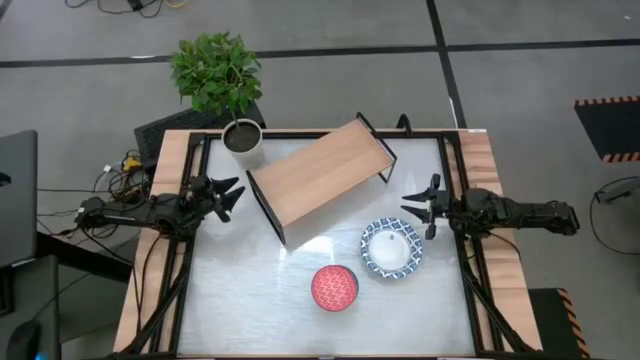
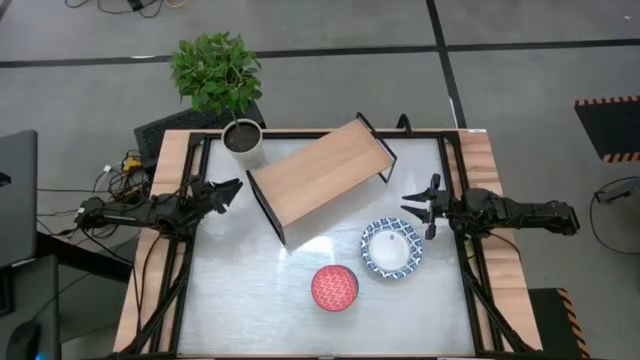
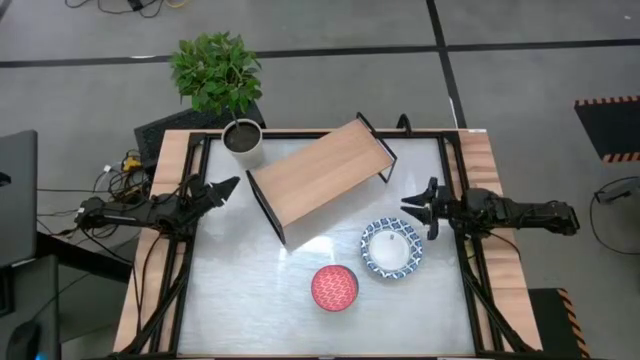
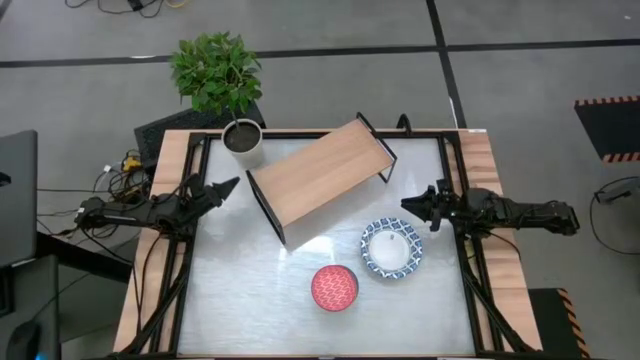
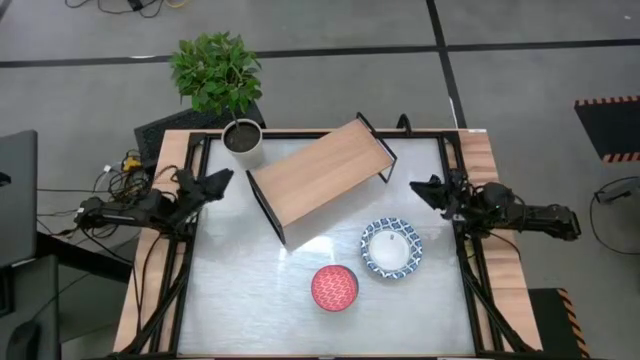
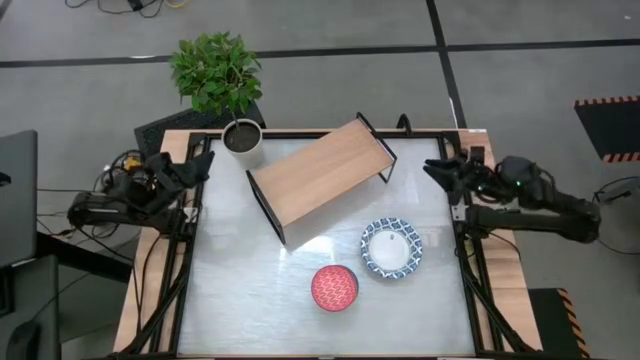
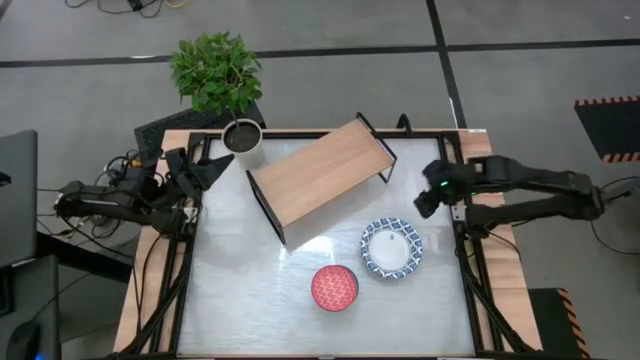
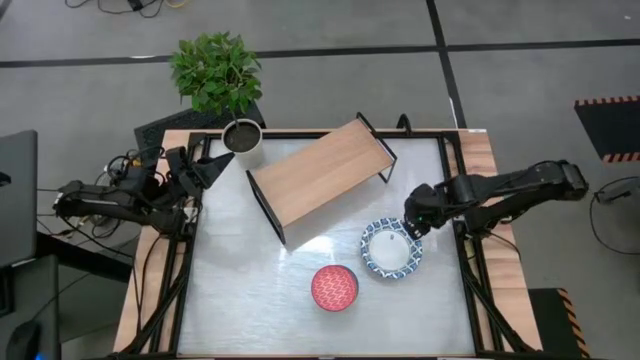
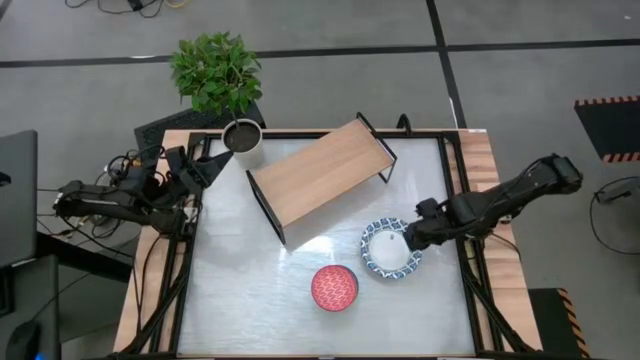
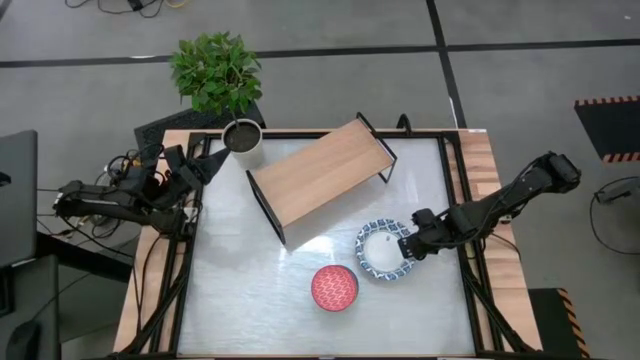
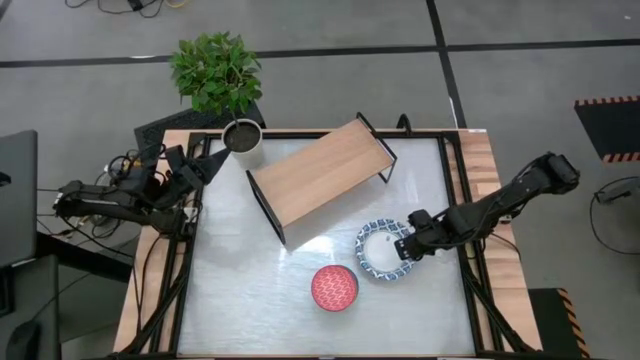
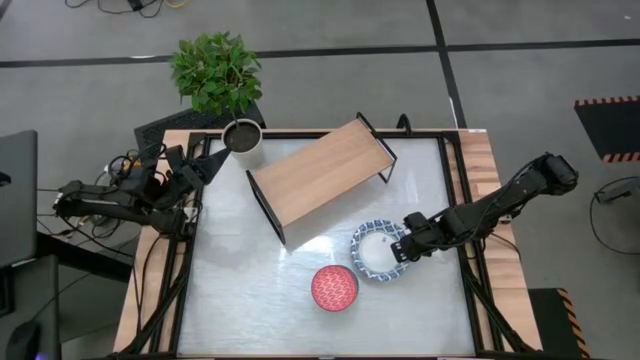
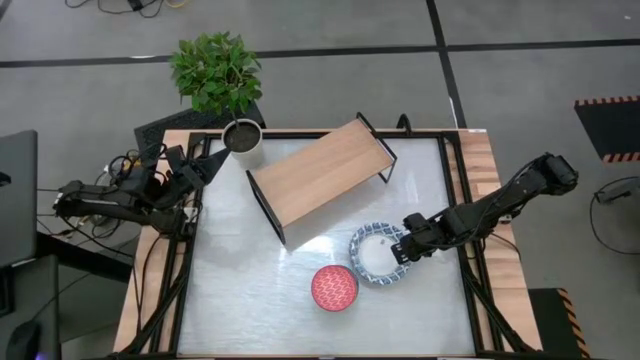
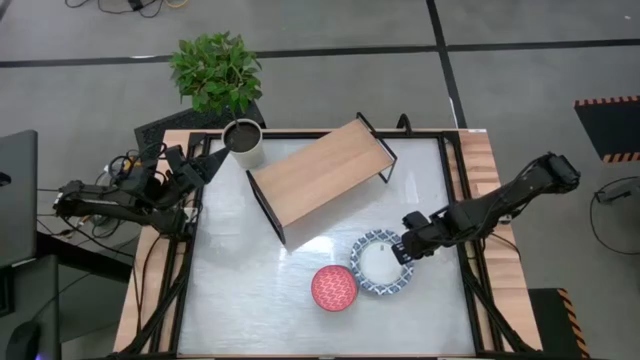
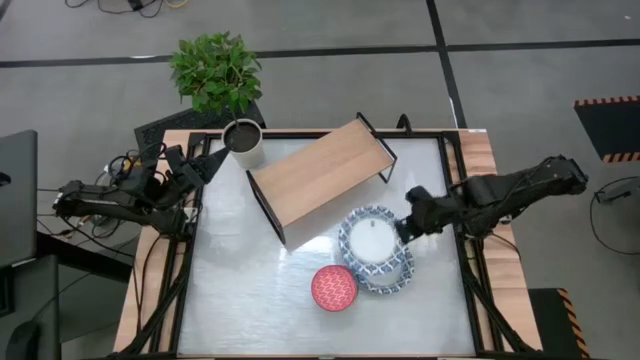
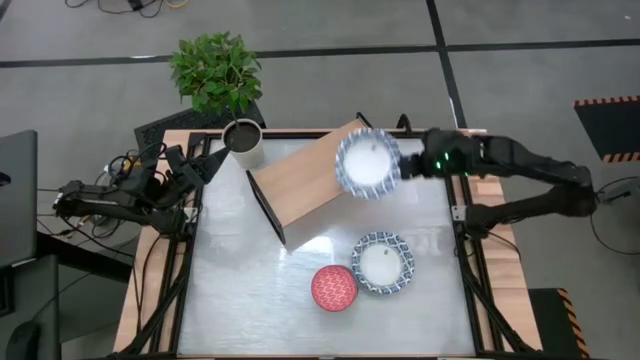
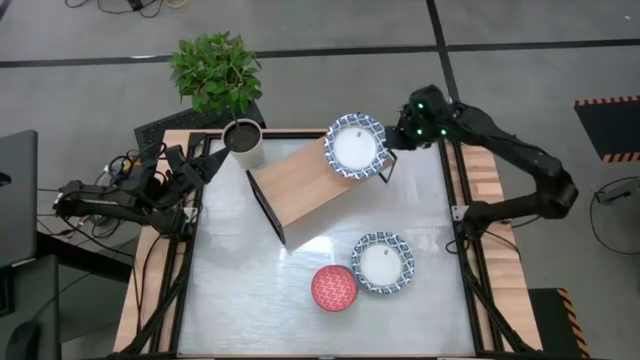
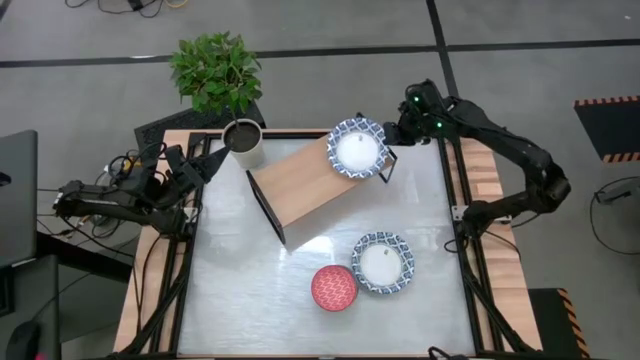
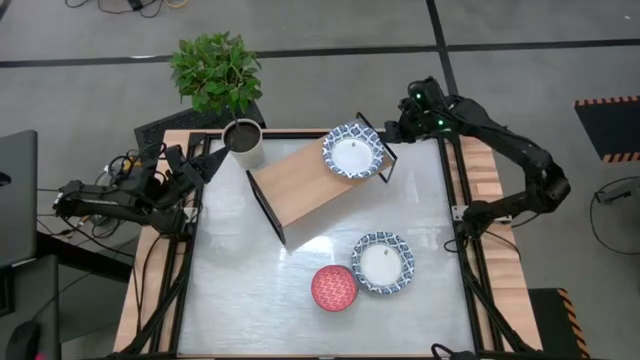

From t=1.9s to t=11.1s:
Task: Place and stack bowls onto a shelf
Put the white bowl on the shelf

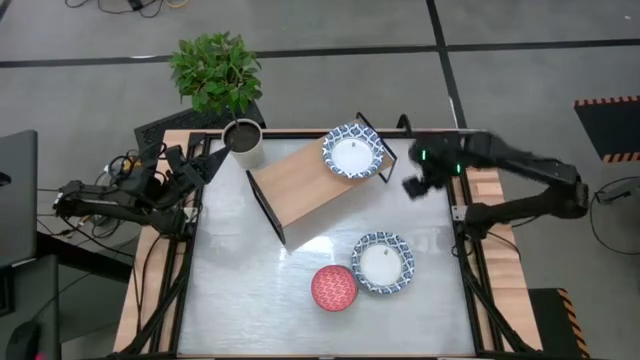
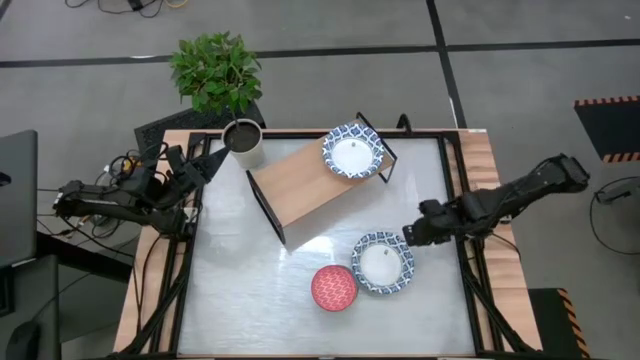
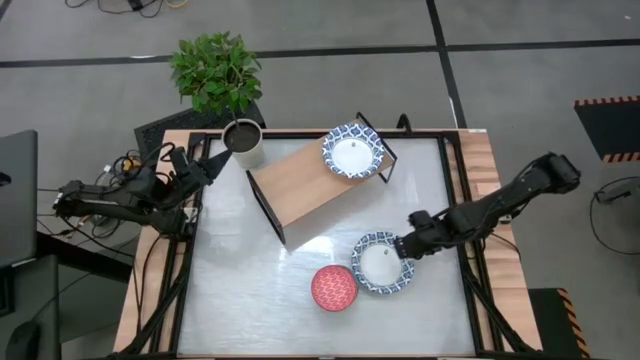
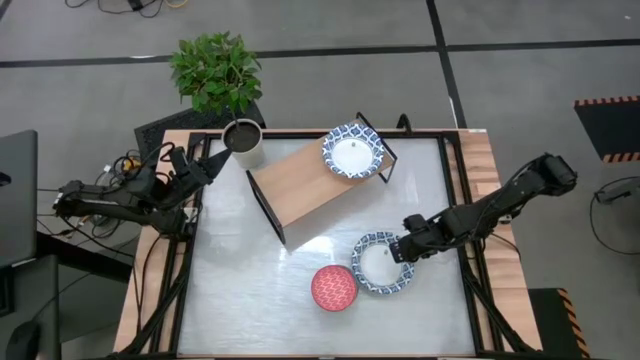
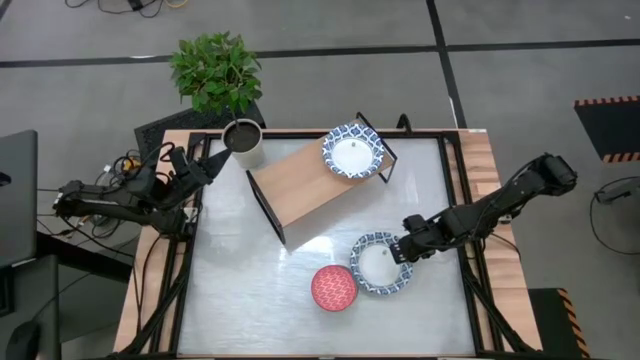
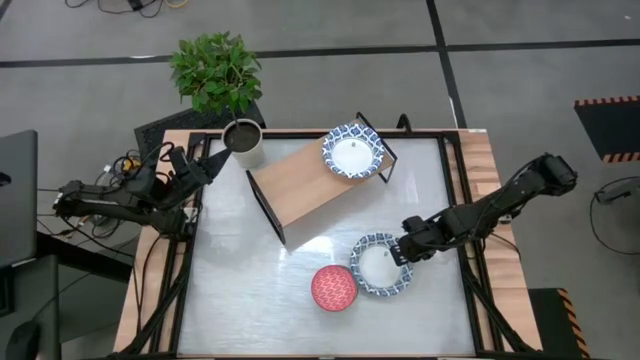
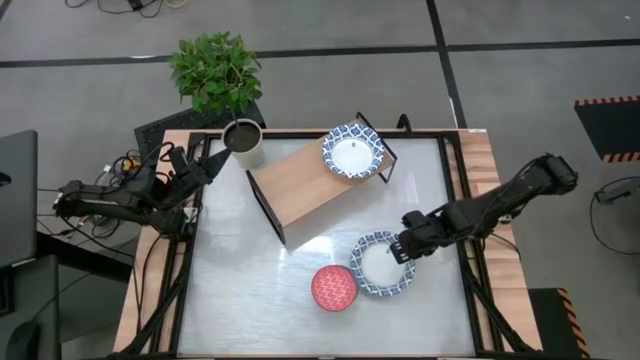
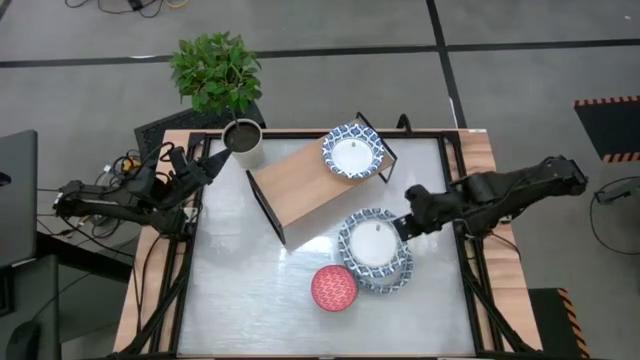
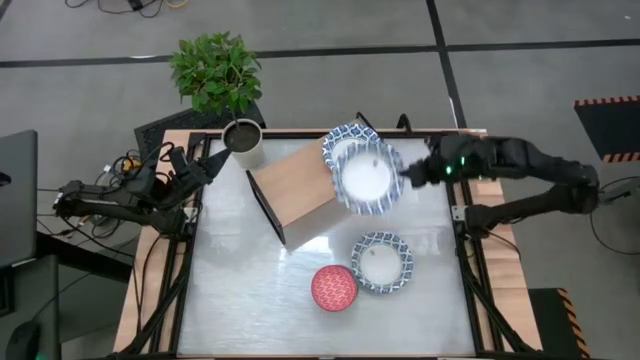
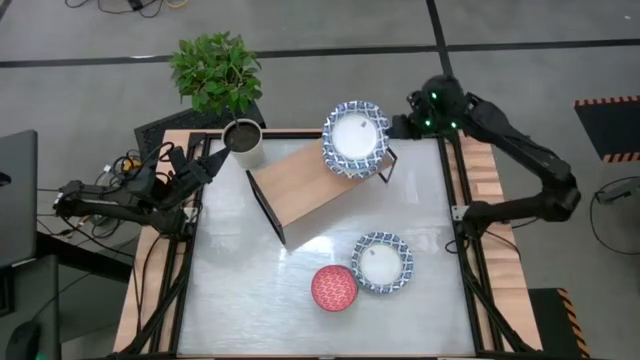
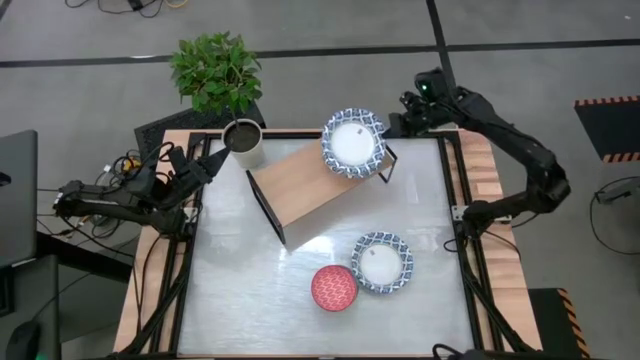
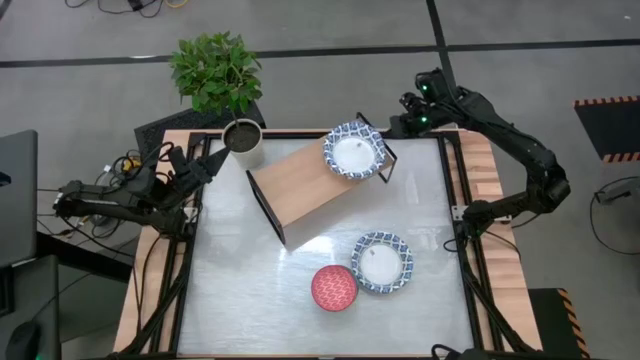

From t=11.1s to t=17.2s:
Stack the white bowl on top of the white bowl on the shelf

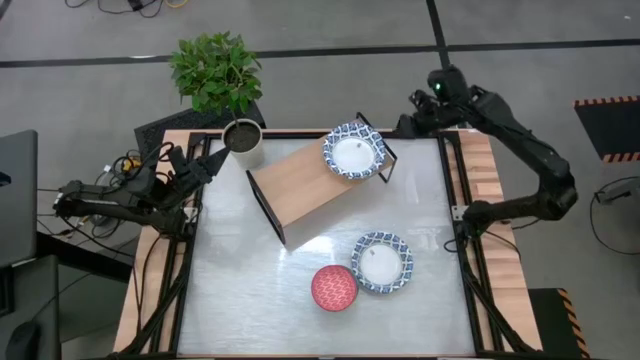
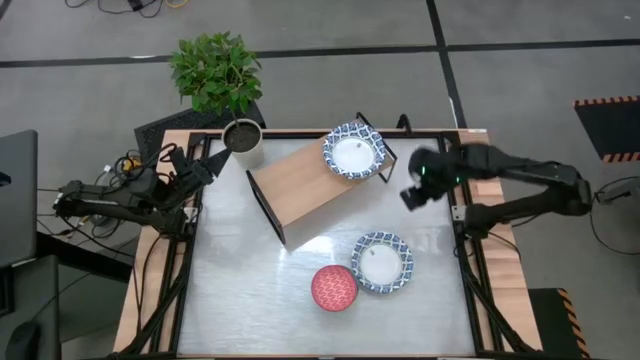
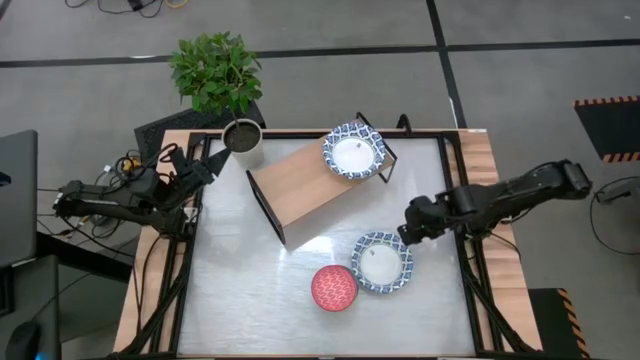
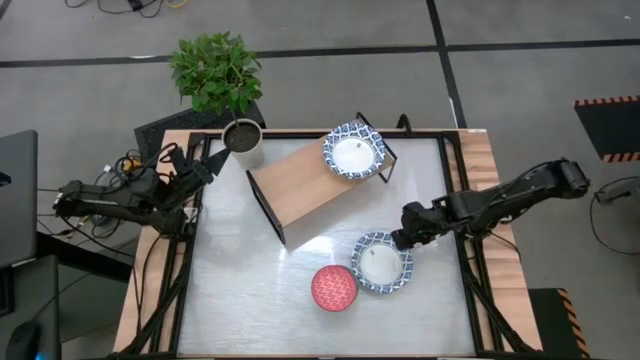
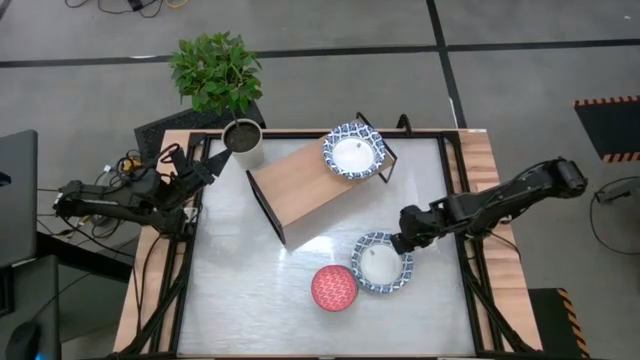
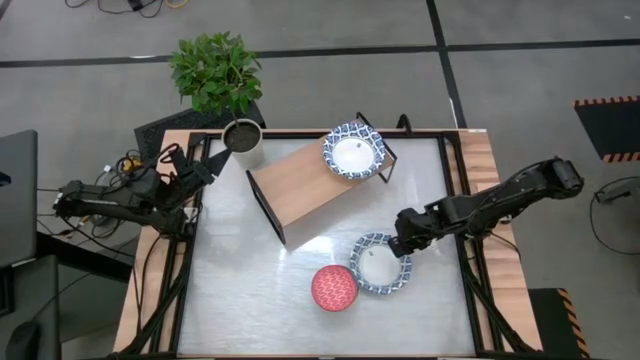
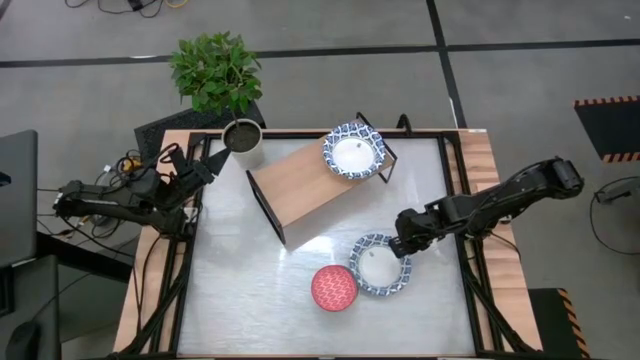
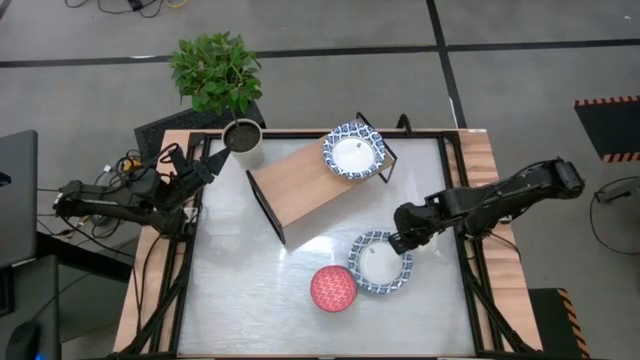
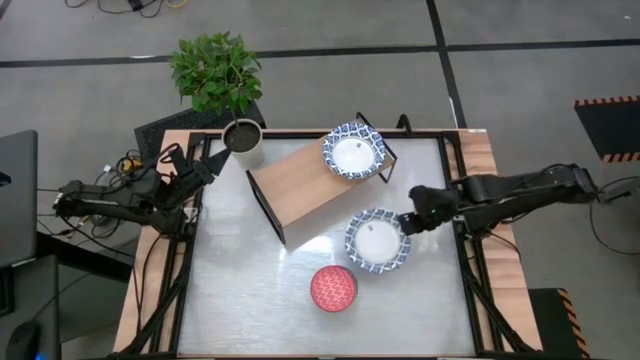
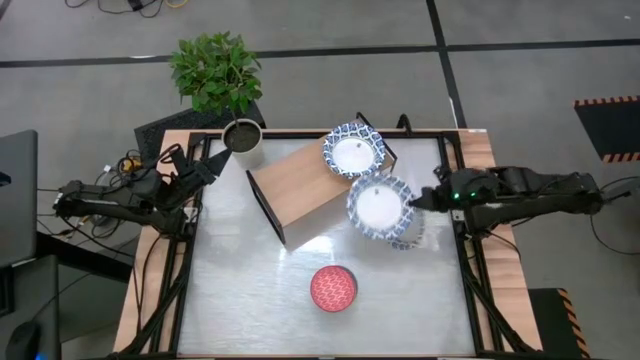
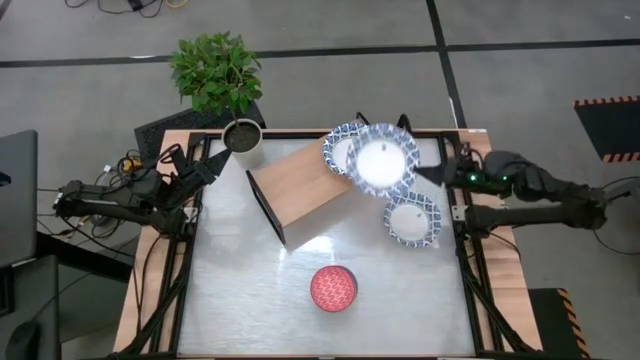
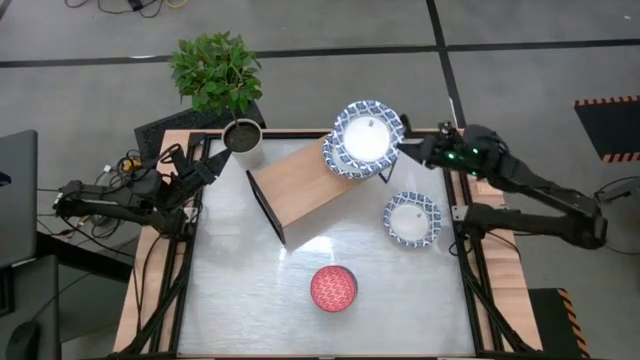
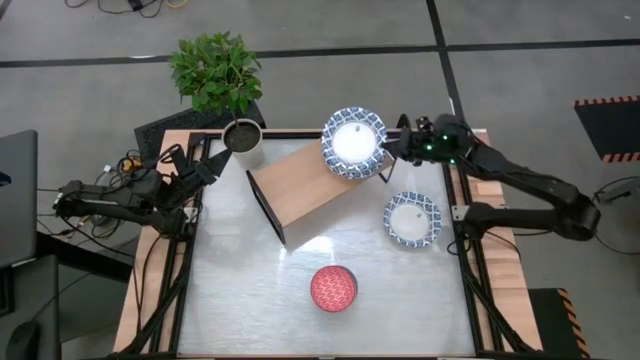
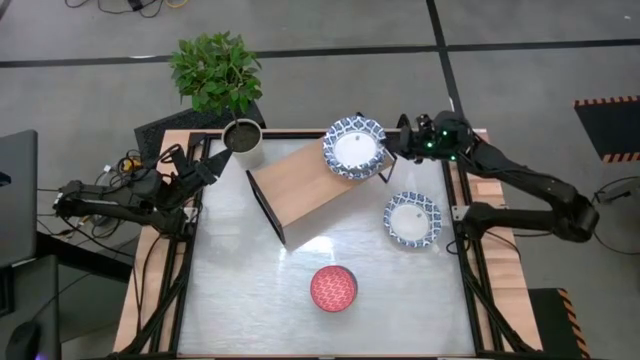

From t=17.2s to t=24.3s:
Stack the white bowl on top of the white bowl on the shelf
